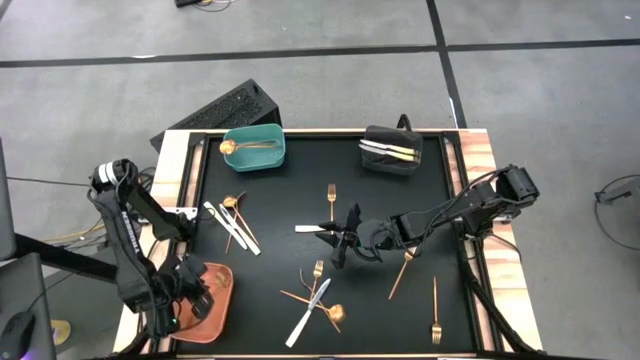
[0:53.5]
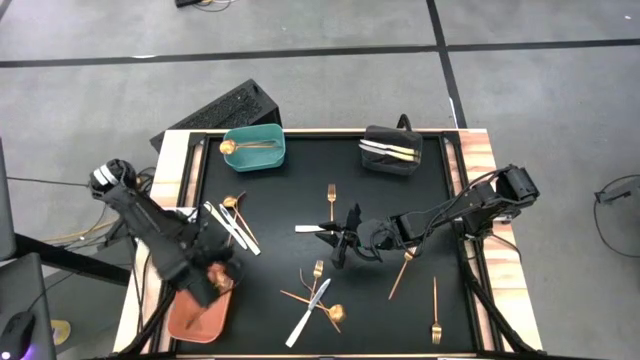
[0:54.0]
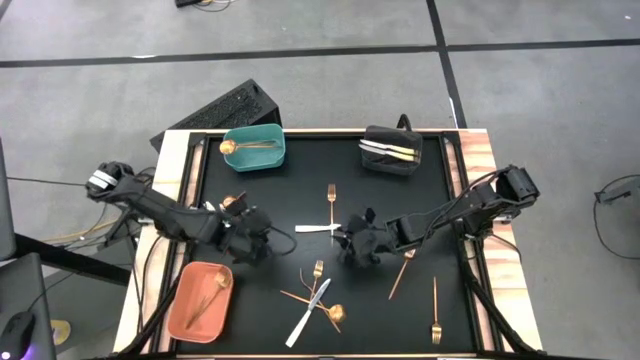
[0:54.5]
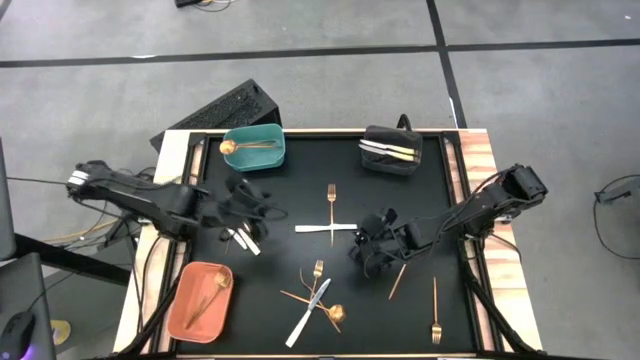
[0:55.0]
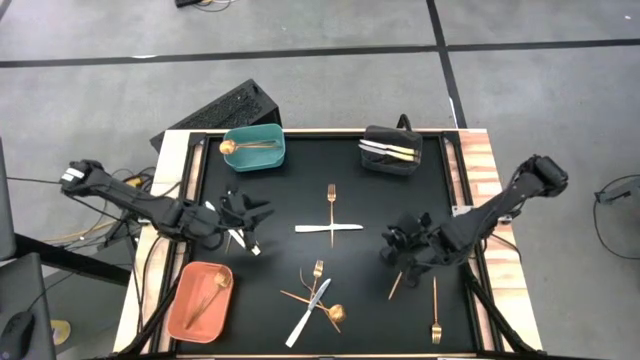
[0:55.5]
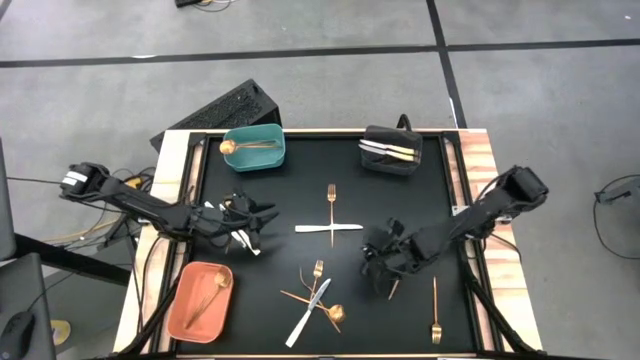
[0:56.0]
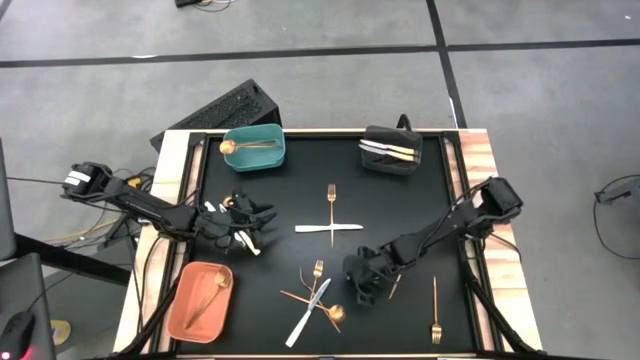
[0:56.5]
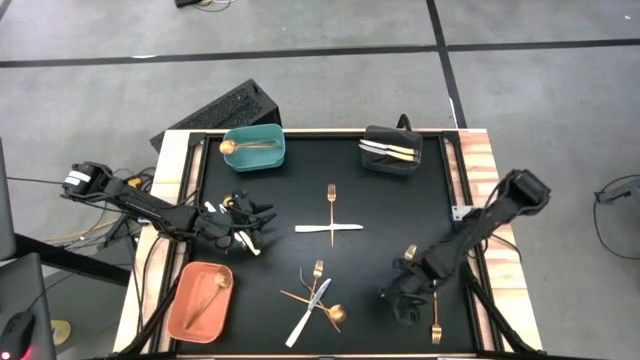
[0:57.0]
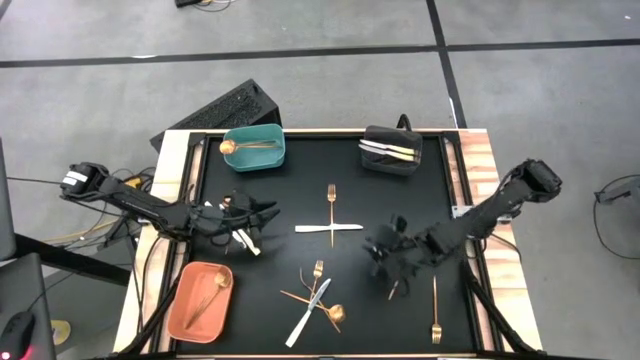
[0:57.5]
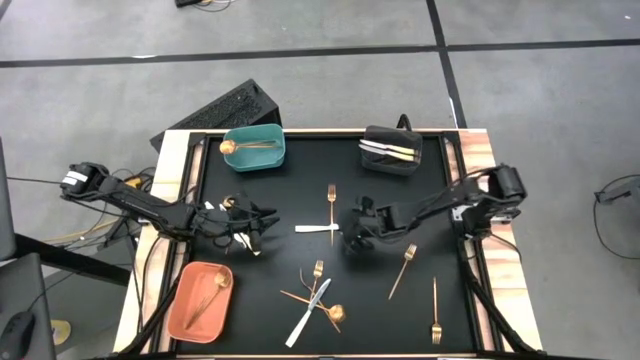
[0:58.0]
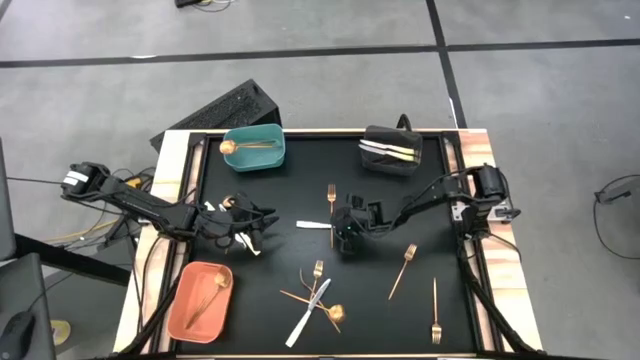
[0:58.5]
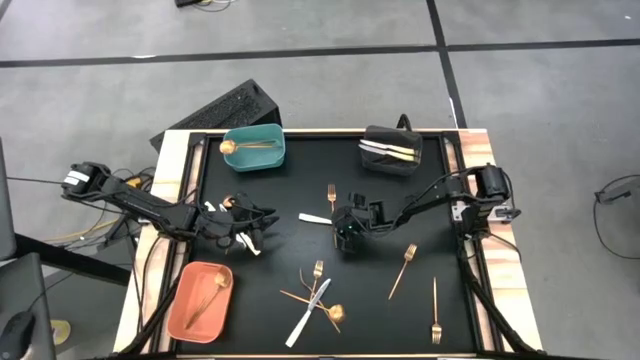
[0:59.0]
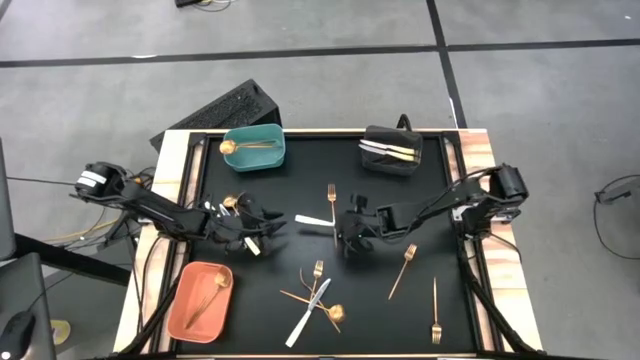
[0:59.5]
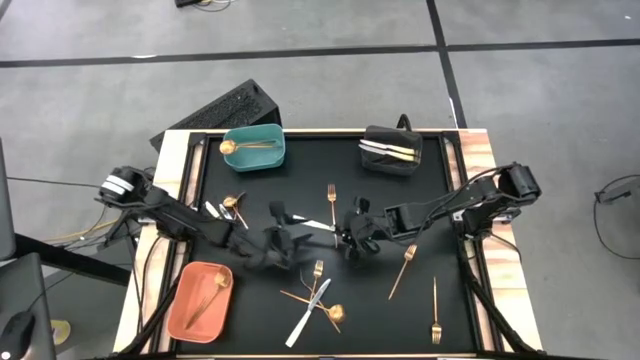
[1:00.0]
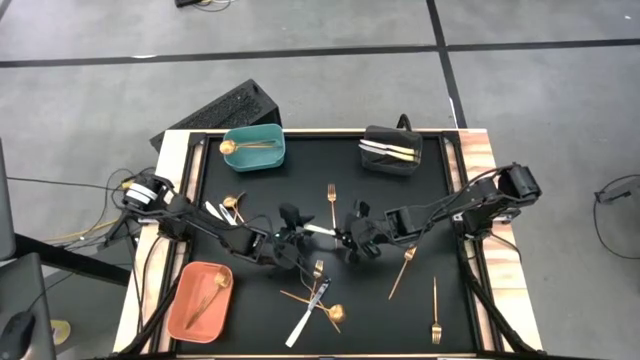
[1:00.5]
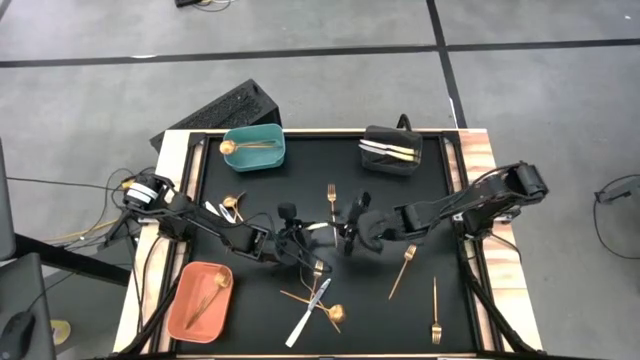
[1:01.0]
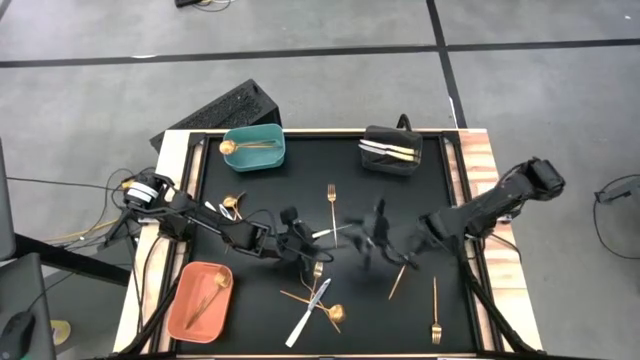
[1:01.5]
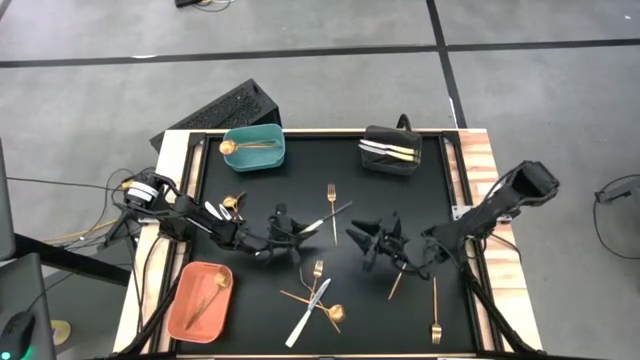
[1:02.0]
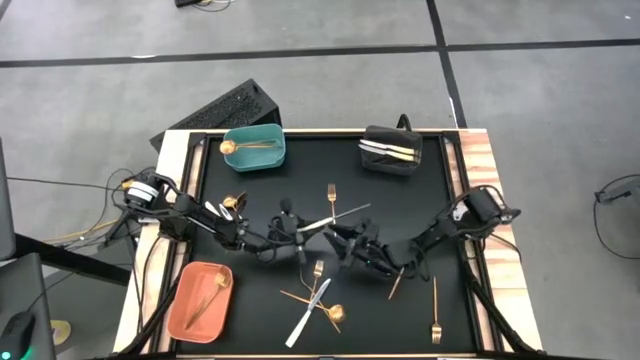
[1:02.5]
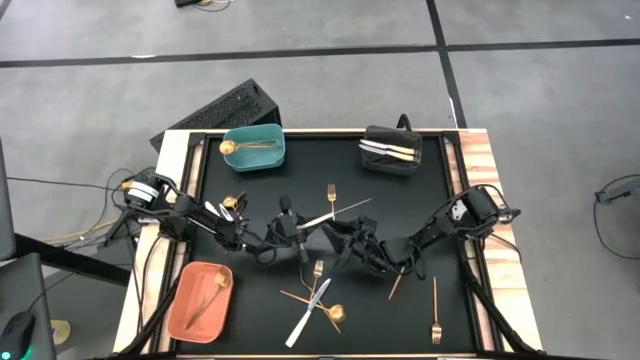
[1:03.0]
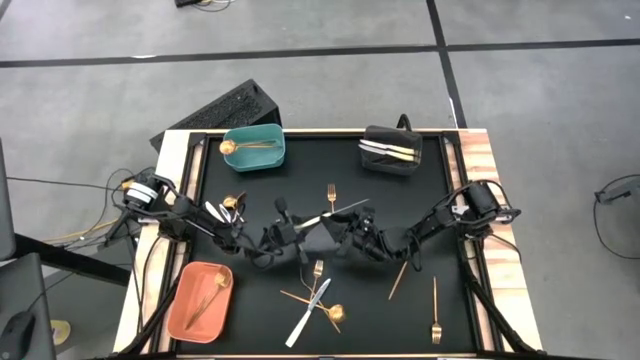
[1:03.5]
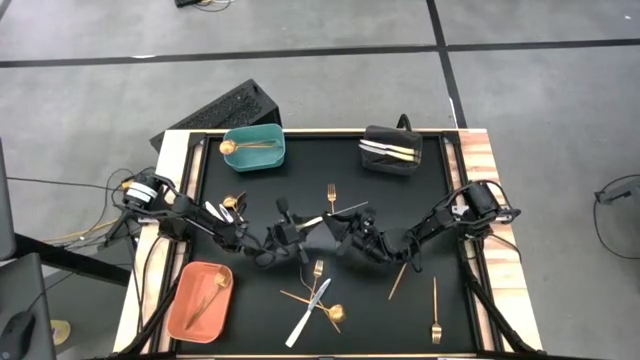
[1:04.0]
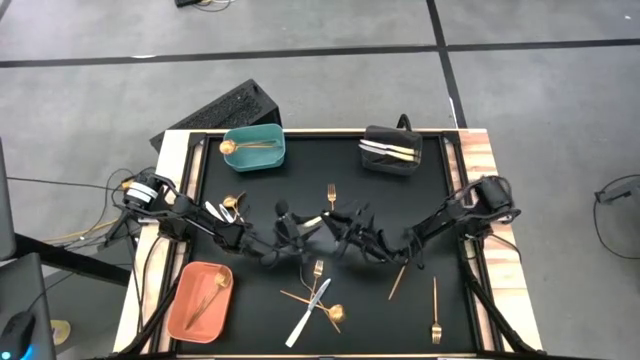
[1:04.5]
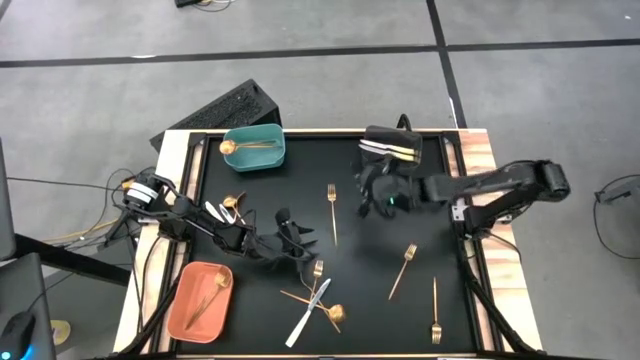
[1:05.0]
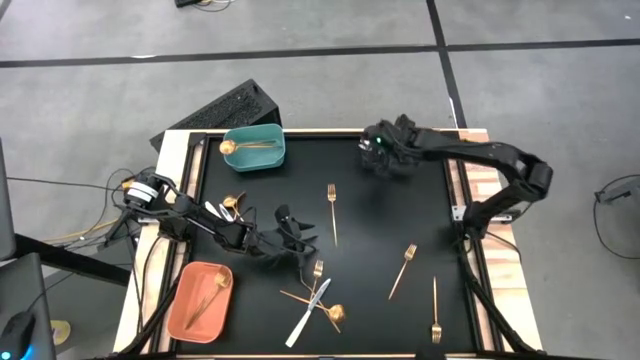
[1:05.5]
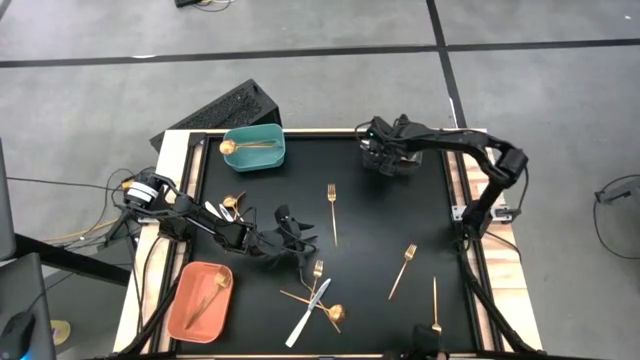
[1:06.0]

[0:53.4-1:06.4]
Task: Sort silverware by color (type)
Put the yellow table knife into the black bin

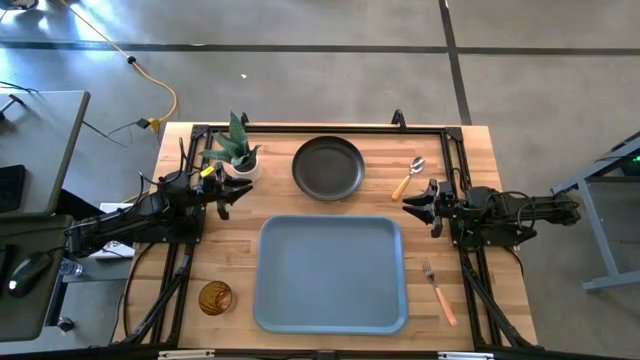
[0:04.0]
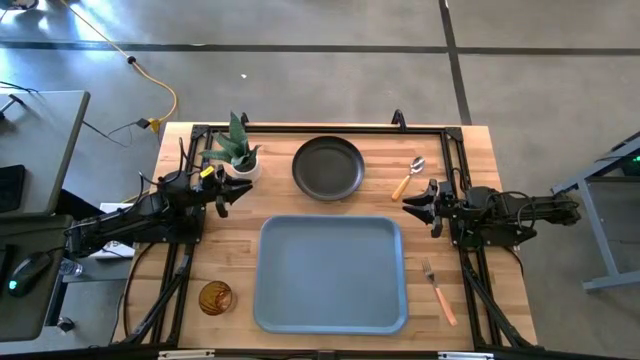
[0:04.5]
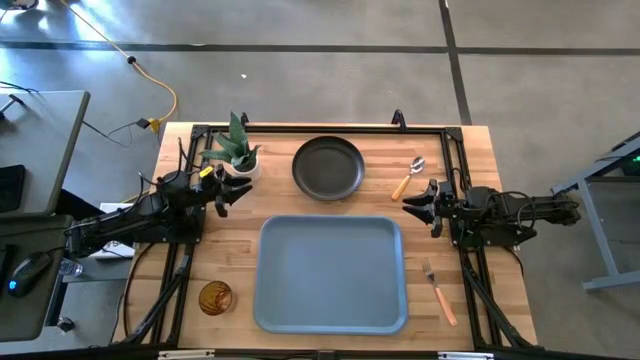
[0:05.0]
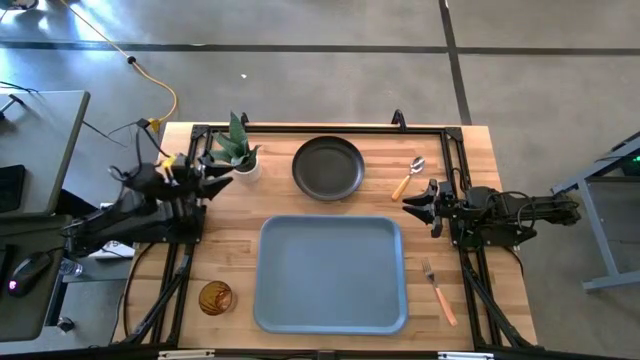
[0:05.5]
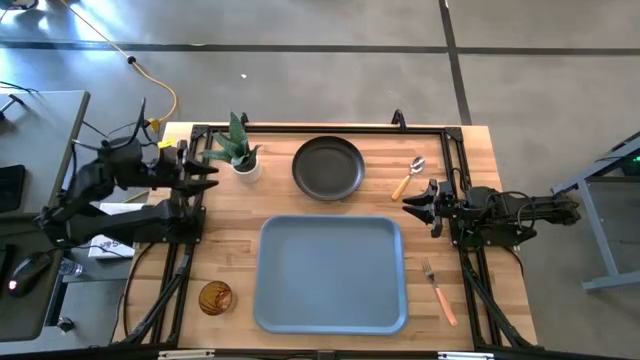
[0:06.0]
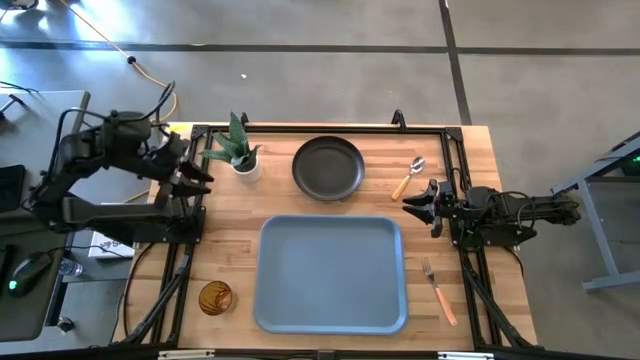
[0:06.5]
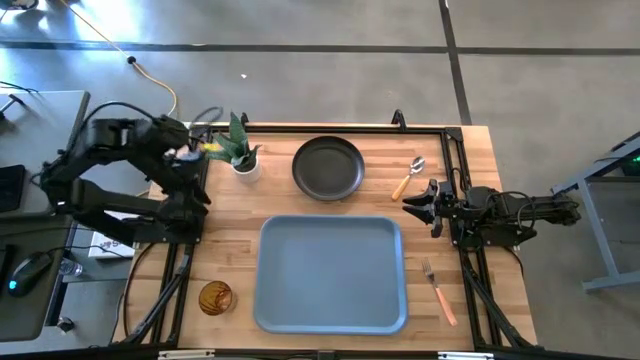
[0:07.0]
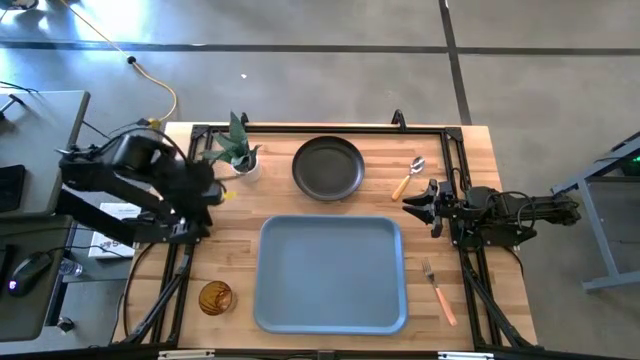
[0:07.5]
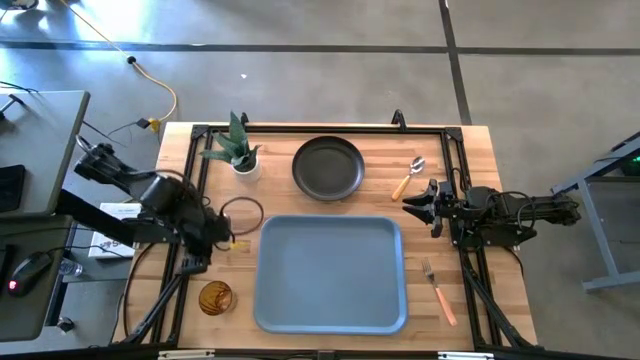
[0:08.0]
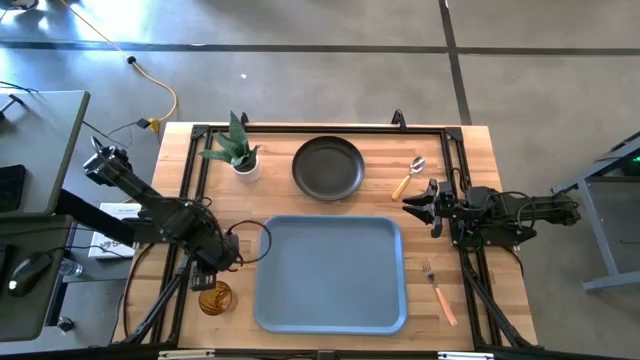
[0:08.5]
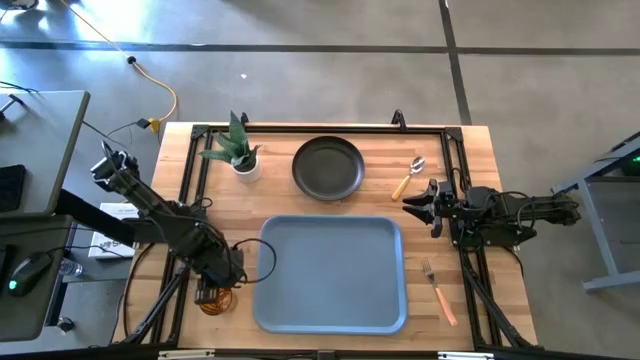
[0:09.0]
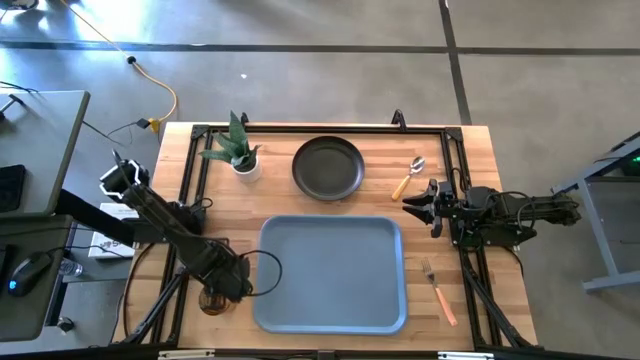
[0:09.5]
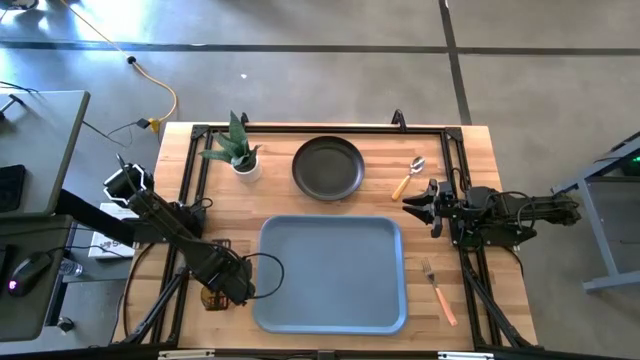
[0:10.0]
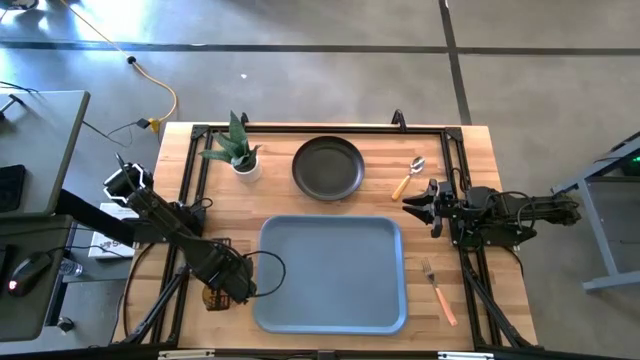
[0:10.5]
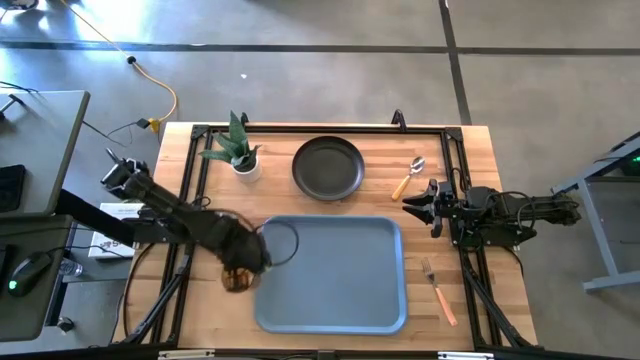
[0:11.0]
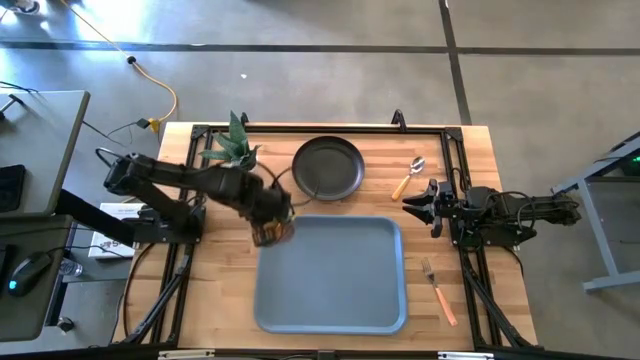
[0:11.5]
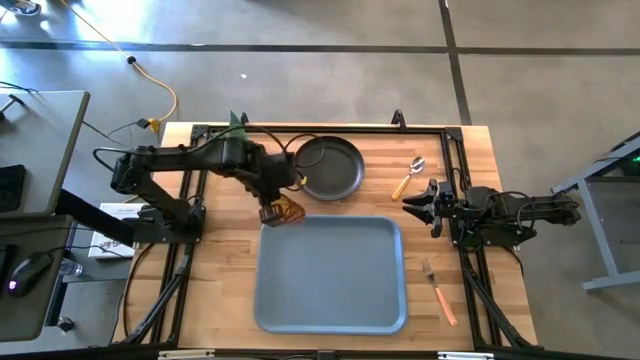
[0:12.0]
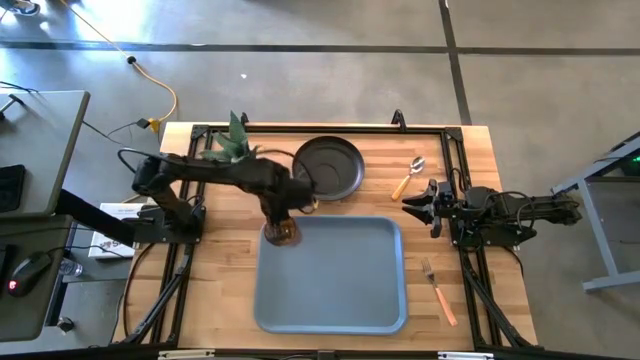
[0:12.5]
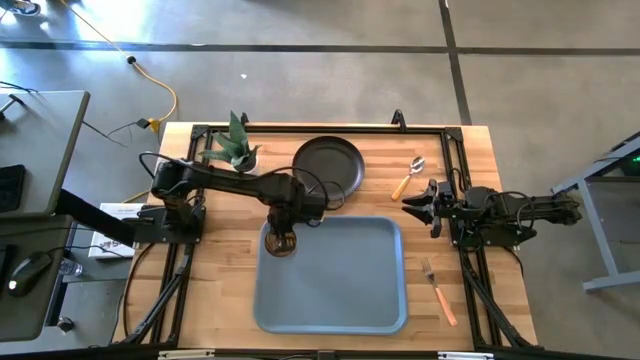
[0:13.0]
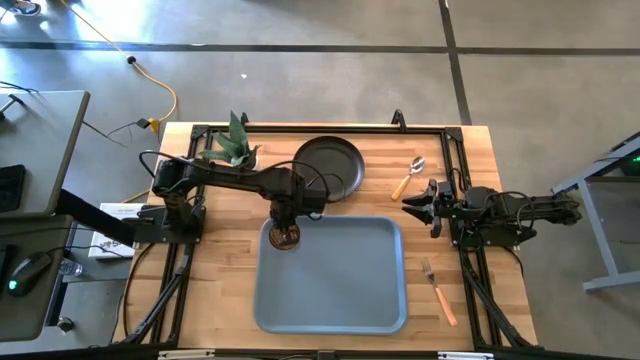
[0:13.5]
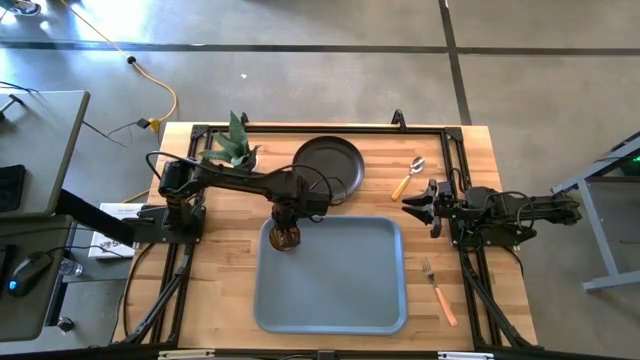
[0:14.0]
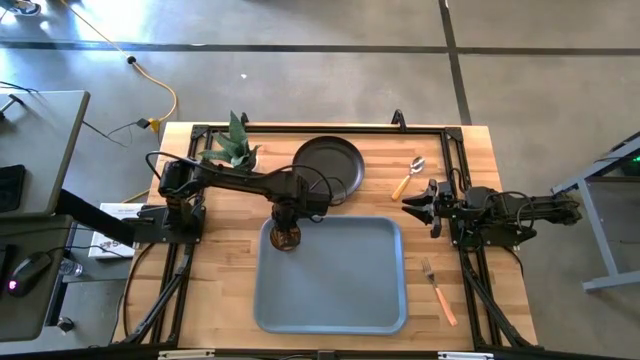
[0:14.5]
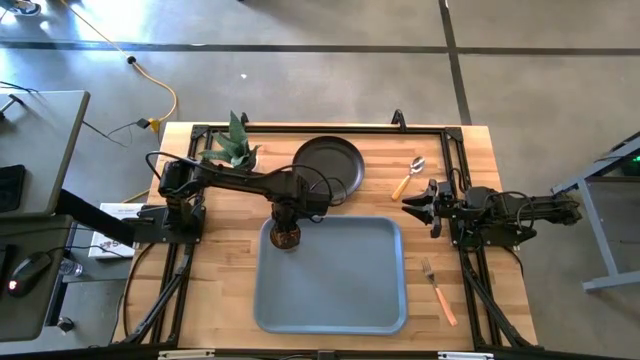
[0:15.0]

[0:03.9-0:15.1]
Task: Pick and place plate/cup/fork/spoon on tray
Put the brown cup on the top left of the blue tray
